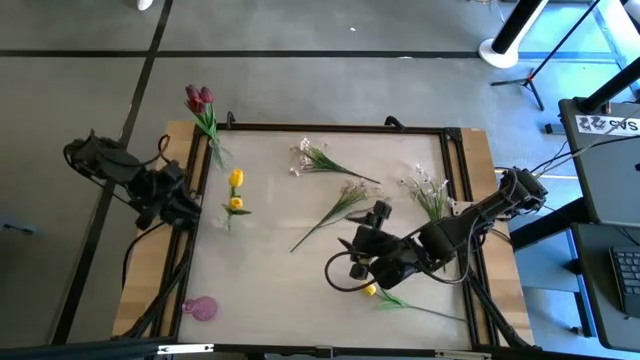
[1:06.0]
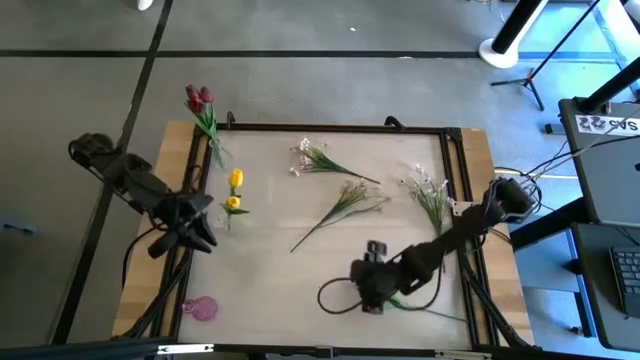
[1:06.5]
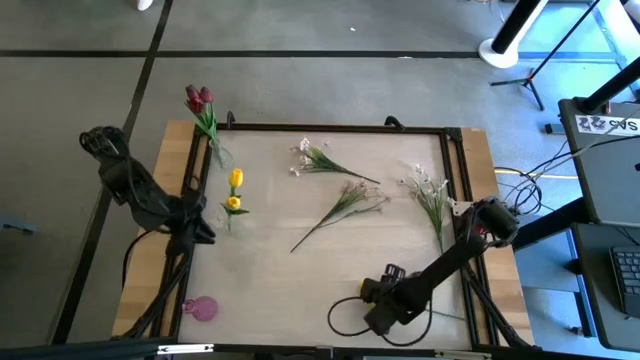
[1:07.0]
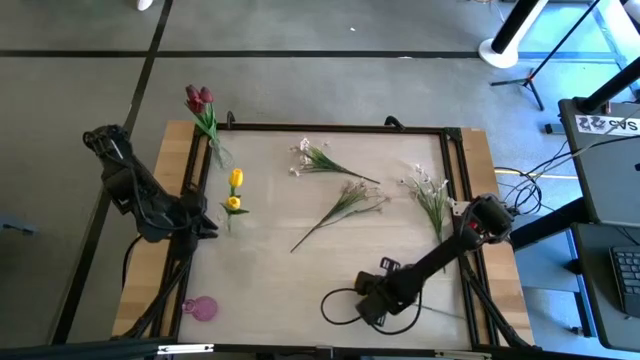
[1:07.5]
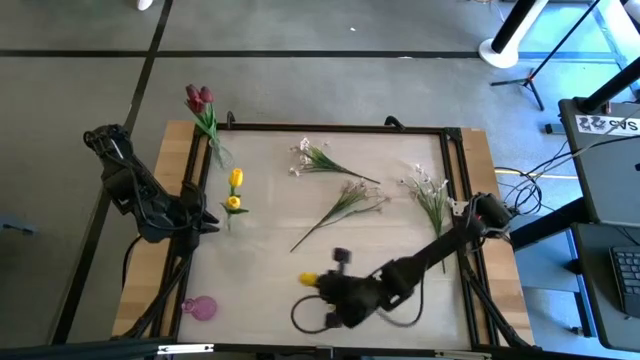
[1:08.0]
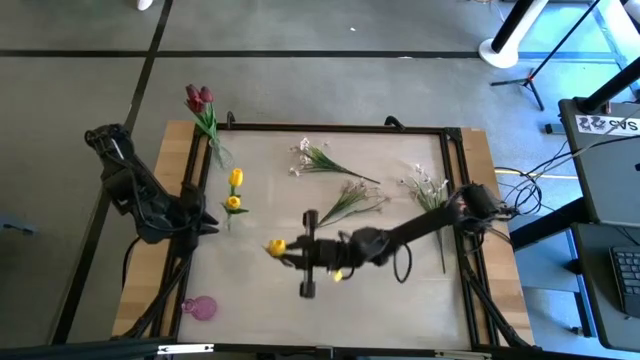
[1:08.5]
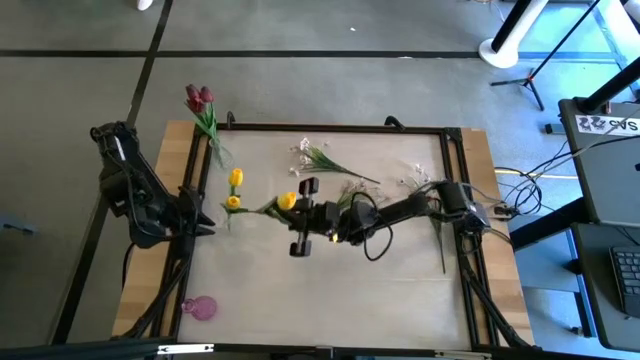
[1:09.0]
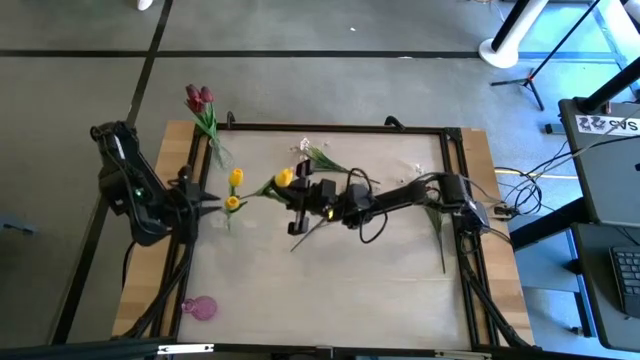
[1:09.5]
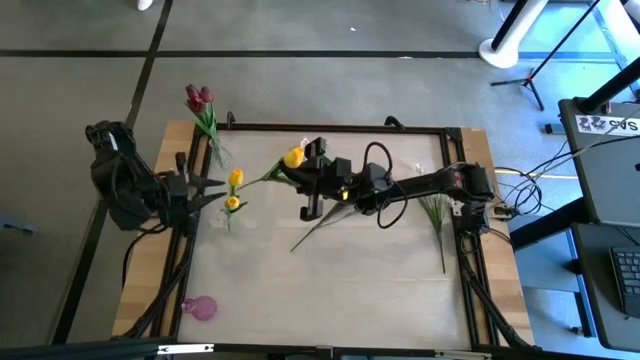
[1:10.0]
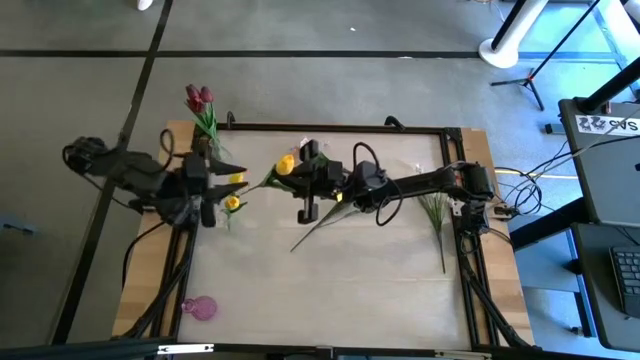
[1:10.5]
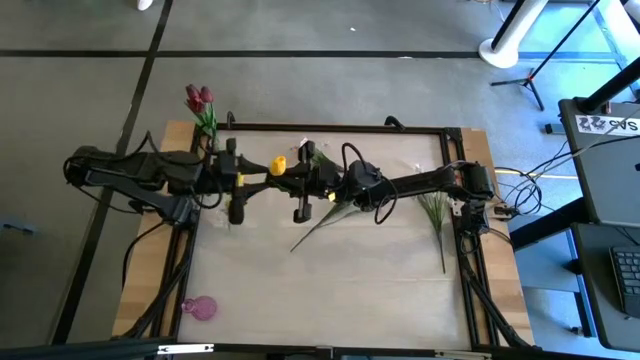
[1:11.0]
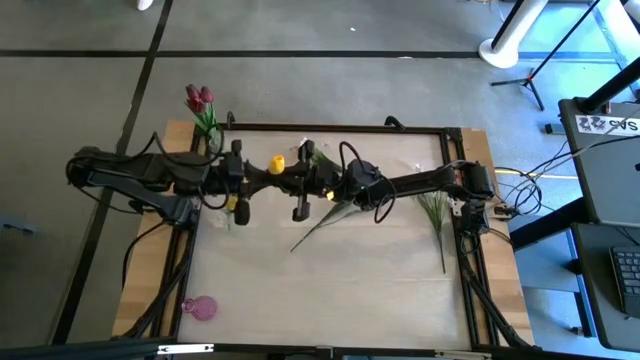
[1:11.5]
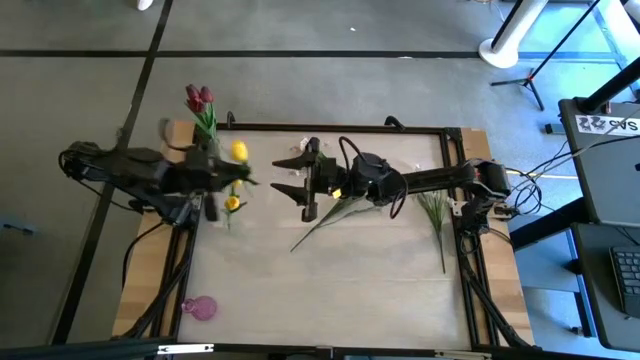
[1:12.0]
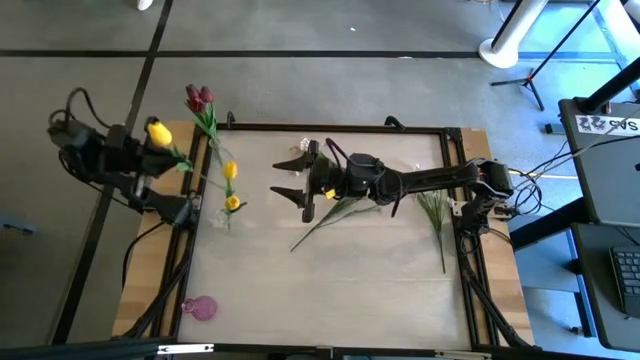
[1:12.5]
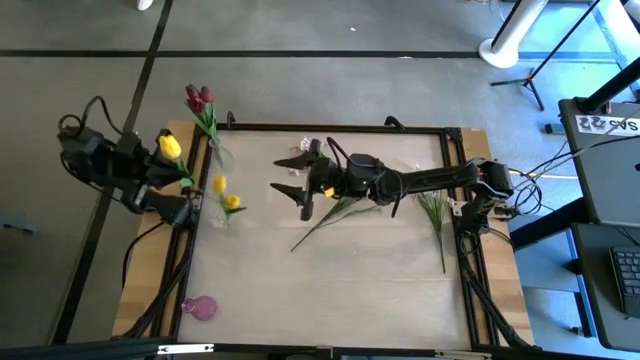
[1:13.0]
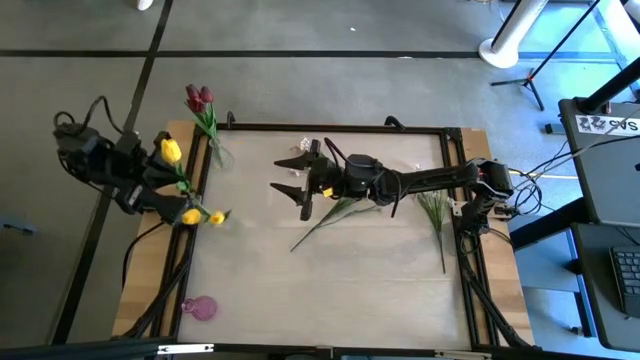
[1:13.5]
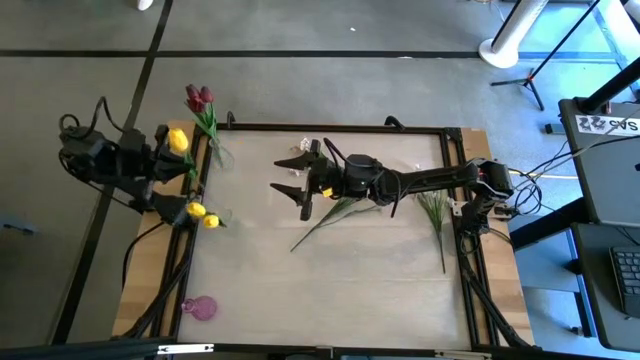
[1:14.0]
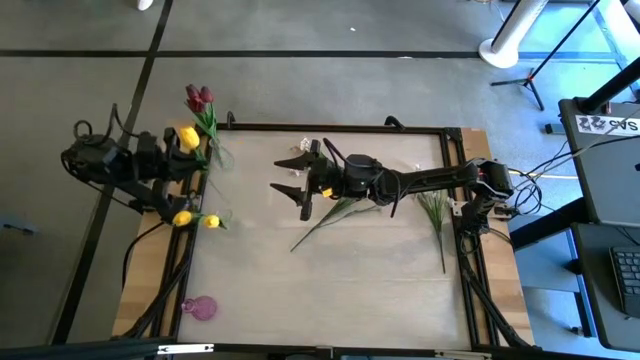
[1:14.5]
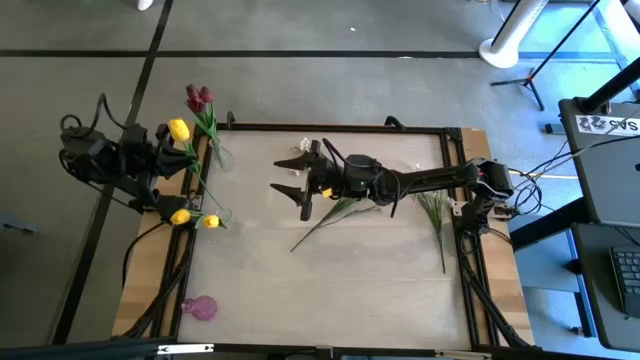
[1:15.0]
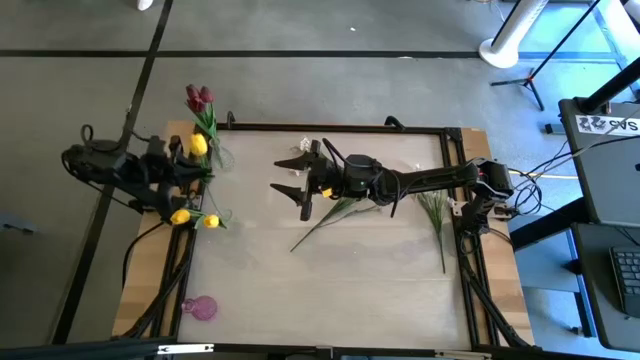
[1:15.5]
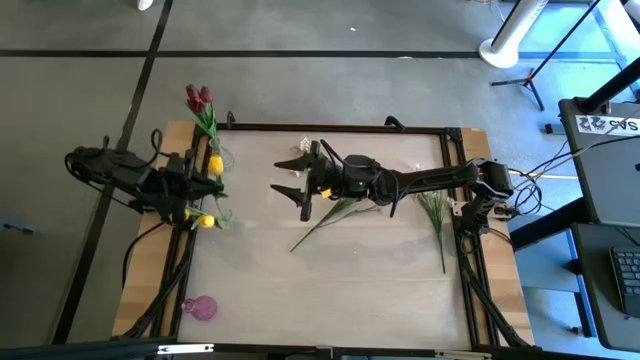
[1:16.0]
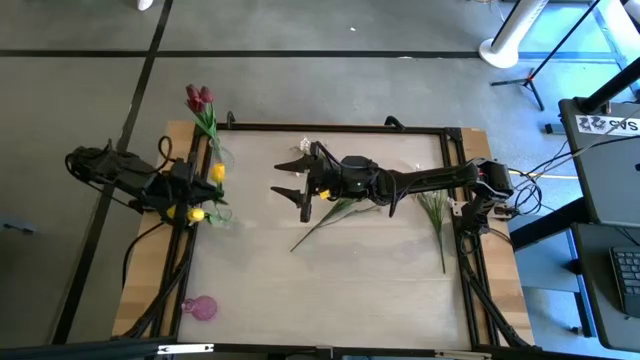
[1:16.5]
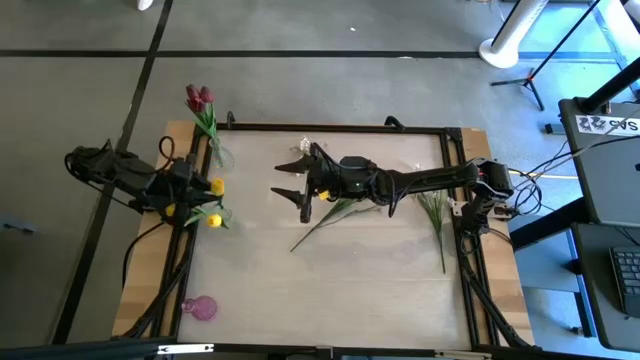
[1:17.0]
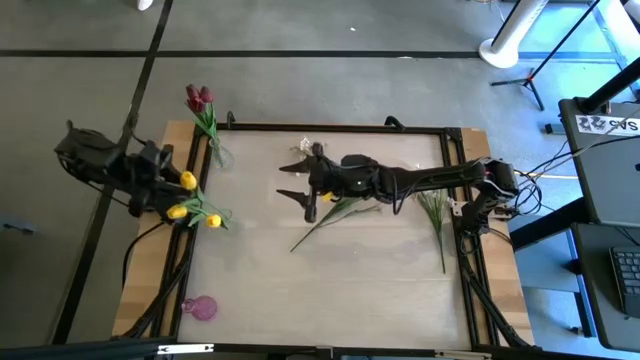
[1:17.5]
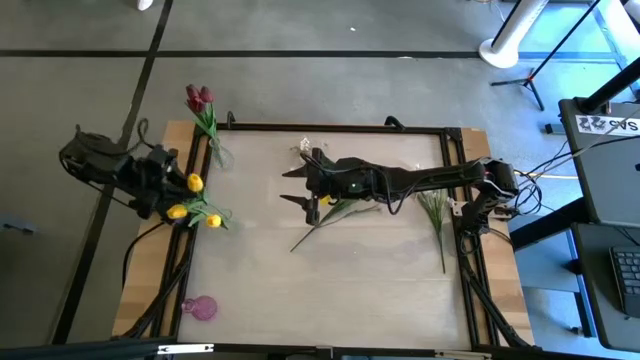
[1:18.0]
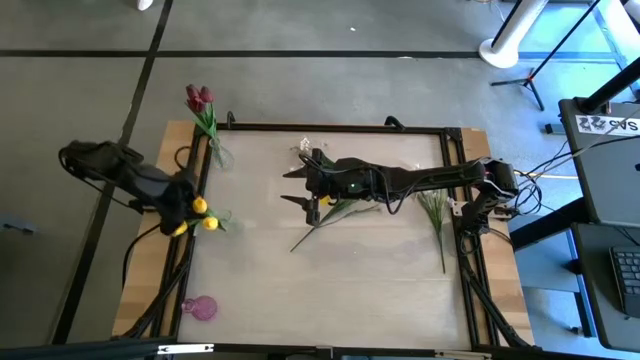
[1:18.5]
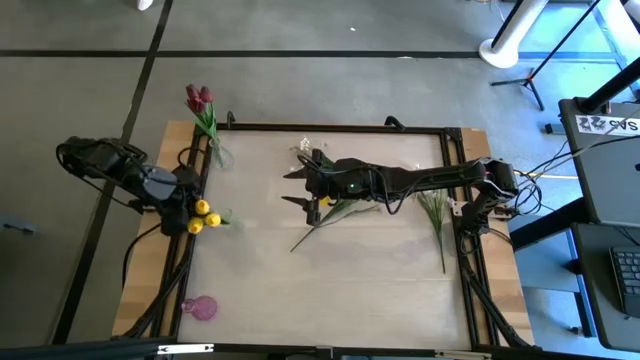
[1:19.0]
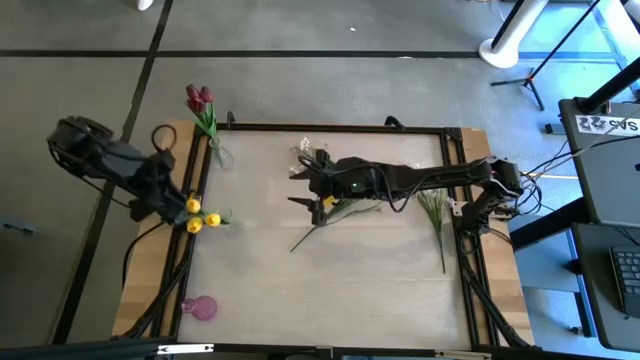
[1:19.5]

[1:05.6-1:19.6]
Task: Sort flowers into vase by color
Put the yellow flower into the bottom transparent vase

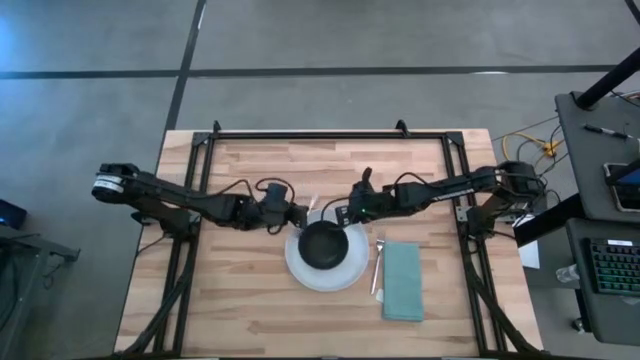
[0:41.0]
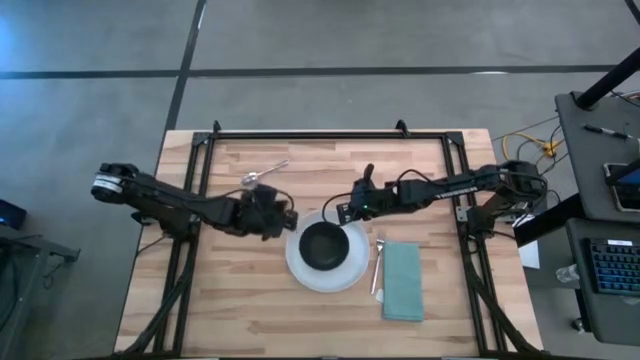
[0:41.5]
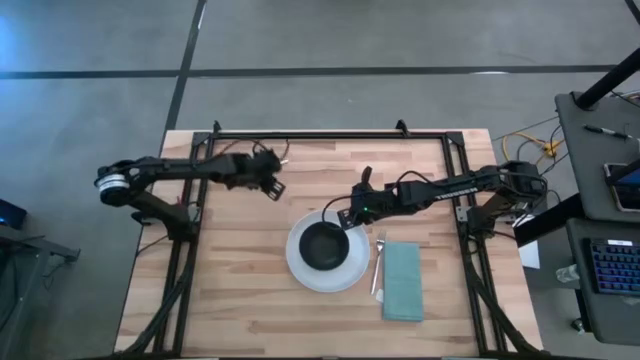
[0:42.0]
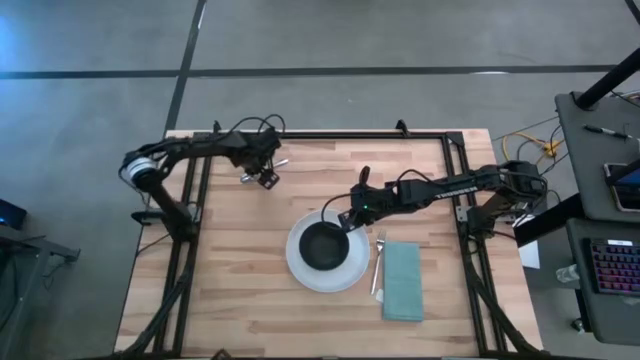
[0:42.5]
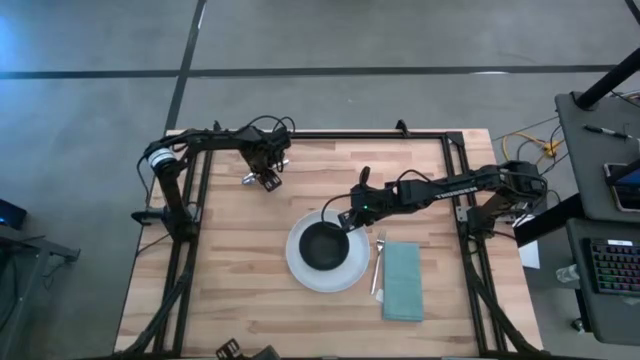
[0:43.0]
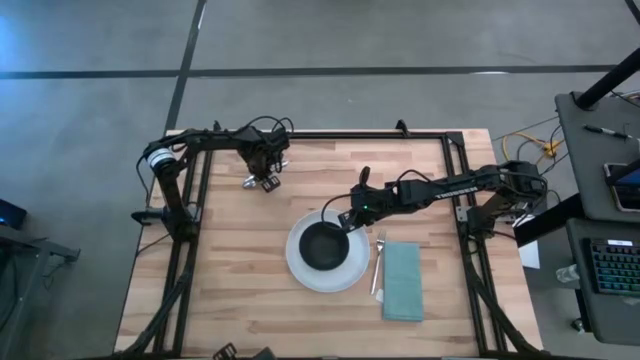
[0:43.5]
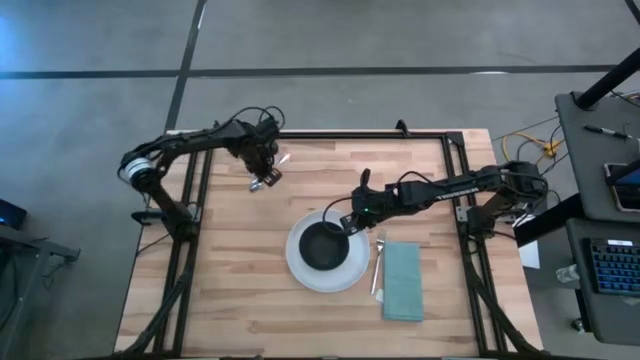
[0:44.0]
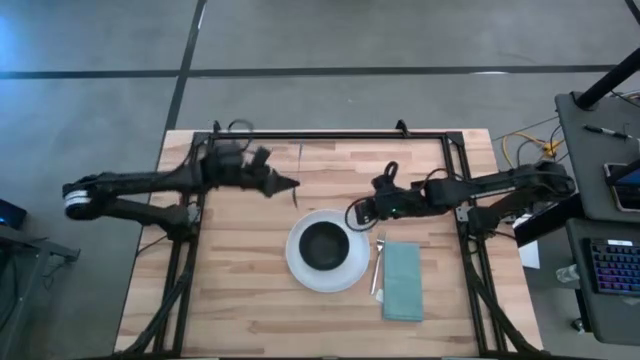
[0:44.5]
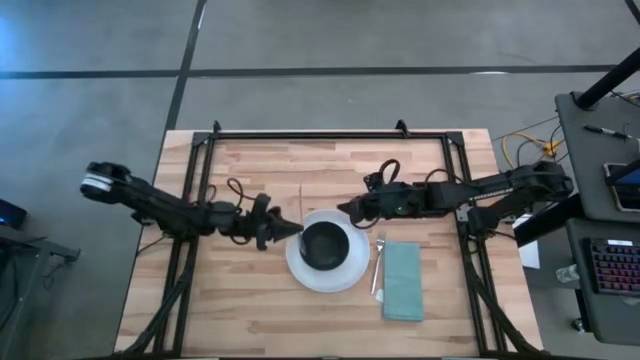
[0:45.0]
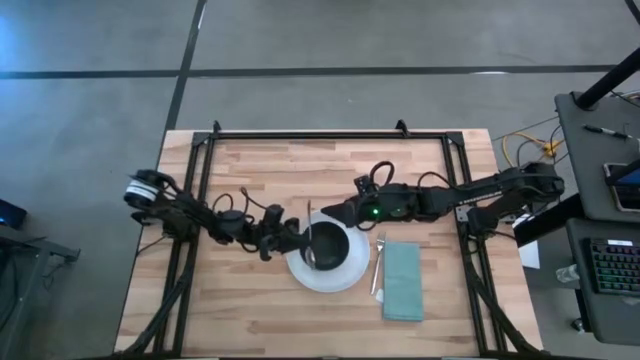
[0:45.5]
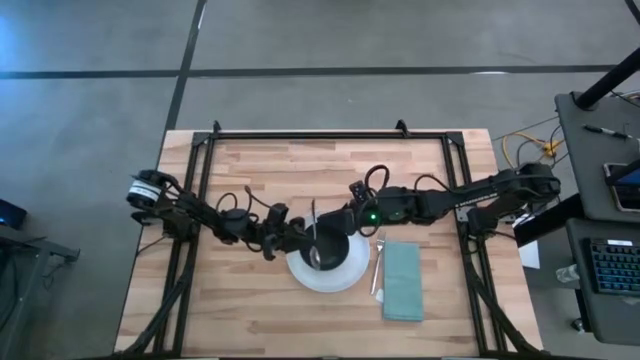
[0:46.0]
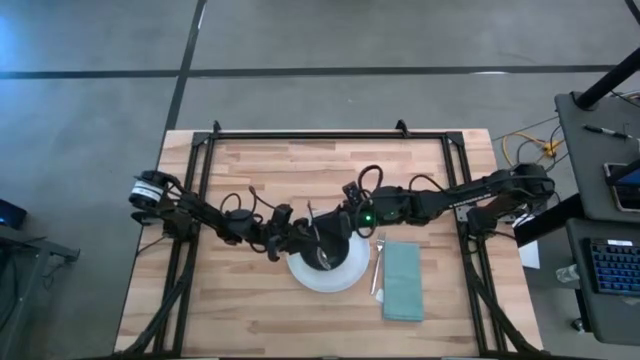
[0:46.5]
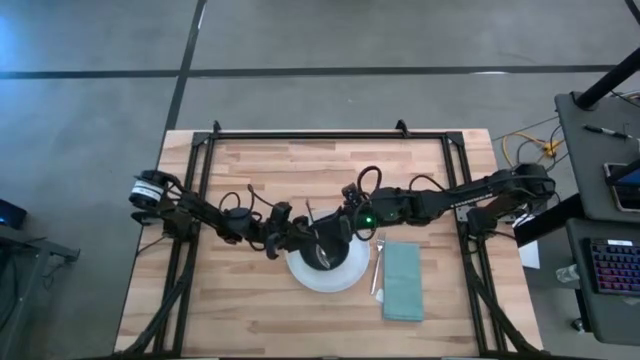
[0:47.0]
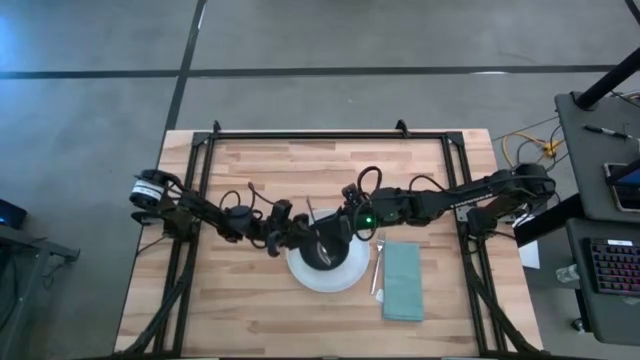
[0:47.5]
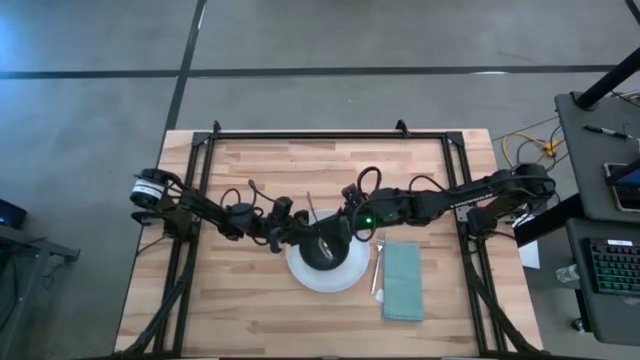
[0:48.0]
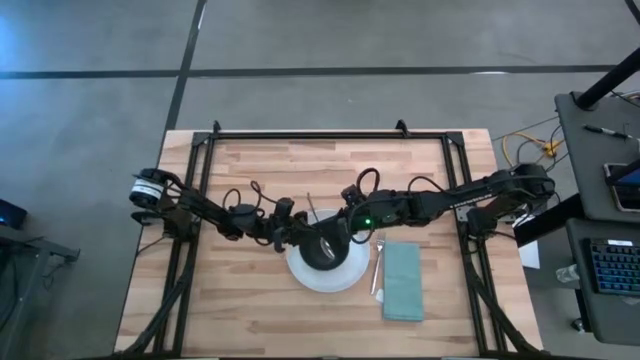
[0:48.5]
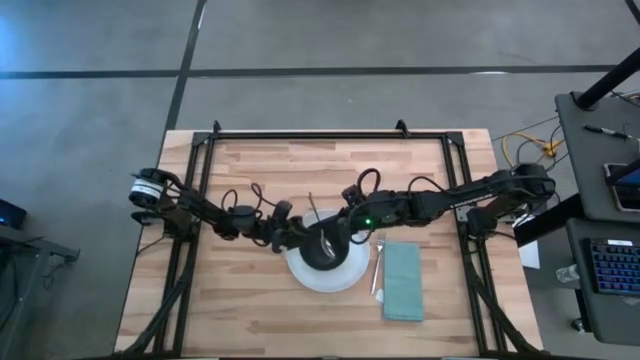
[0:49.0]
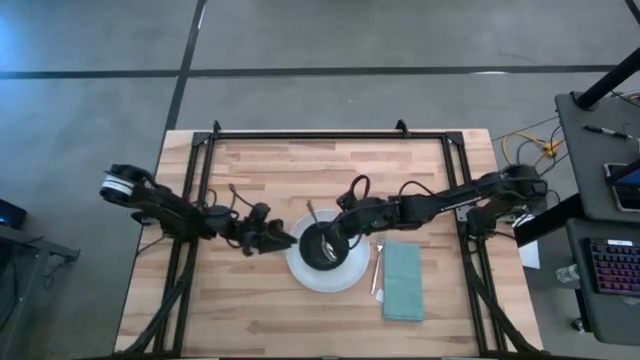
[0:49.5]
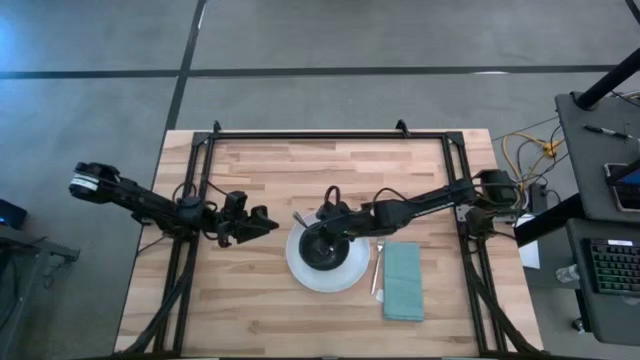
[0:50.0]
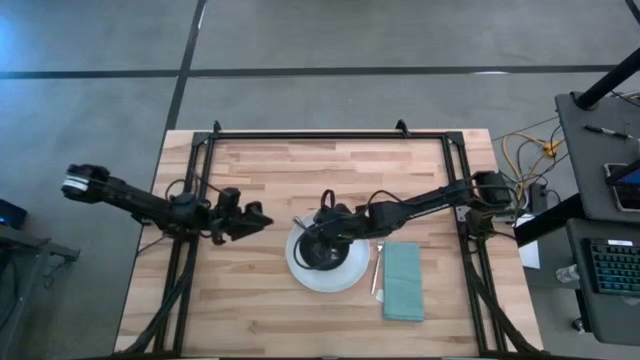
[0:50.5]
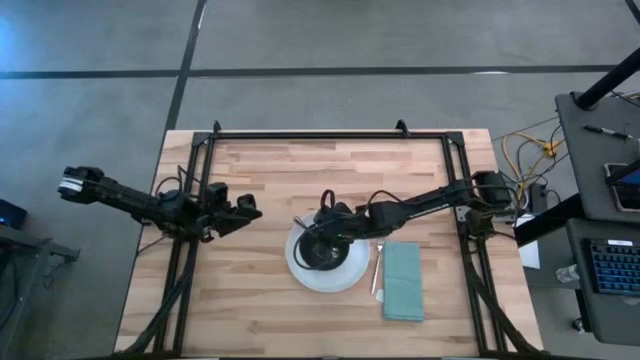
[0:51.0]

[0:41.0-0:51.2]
Task: Set table place
Put the silver spoon into the black bowl
